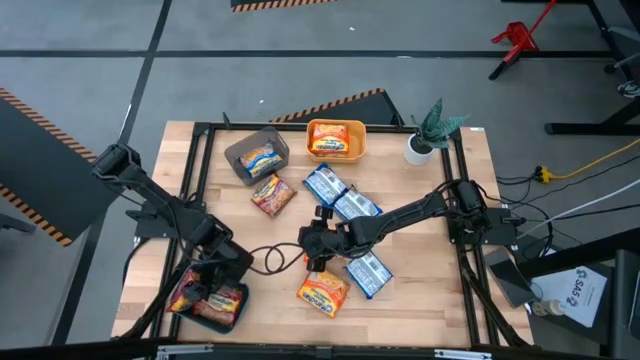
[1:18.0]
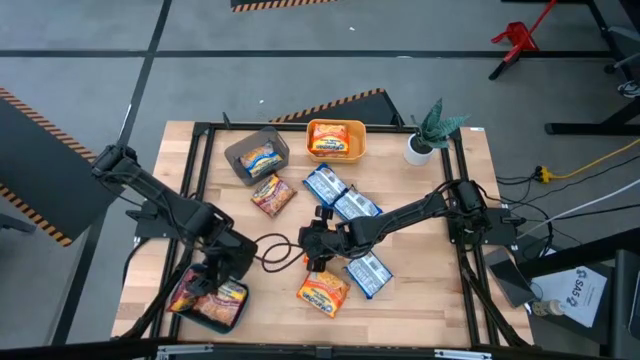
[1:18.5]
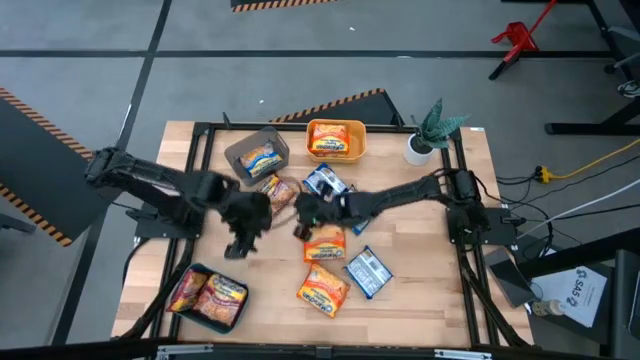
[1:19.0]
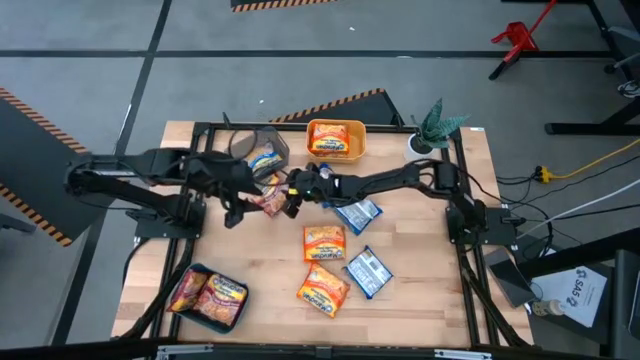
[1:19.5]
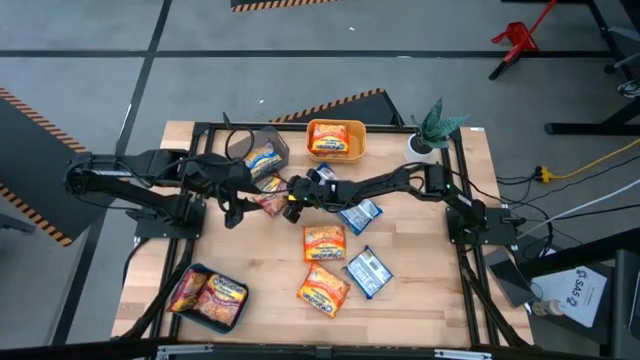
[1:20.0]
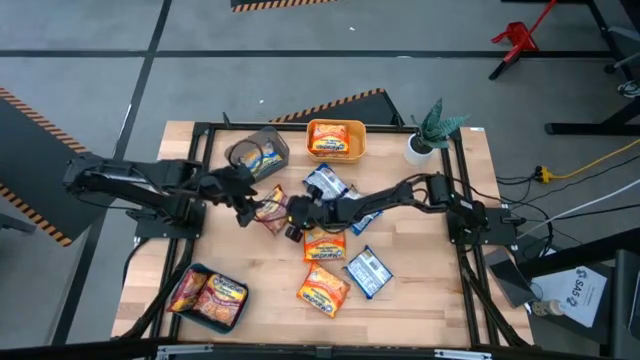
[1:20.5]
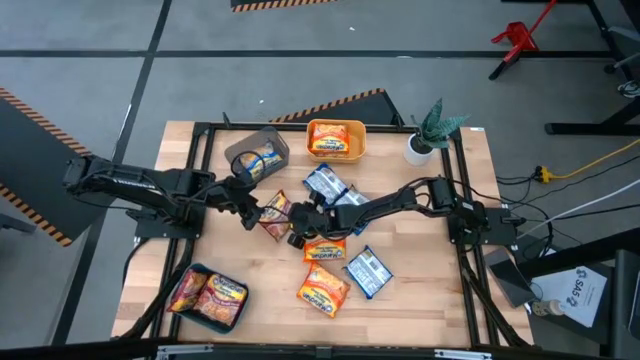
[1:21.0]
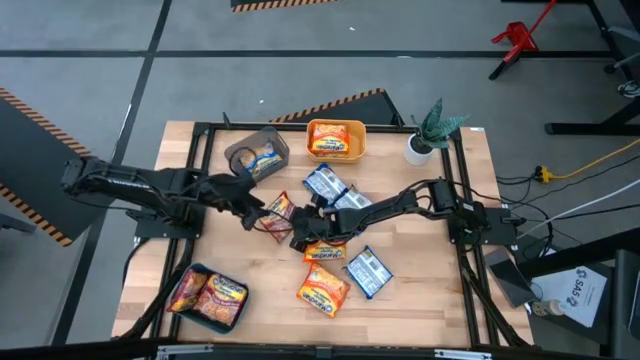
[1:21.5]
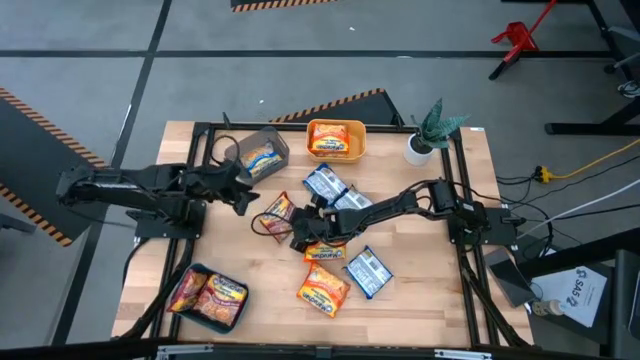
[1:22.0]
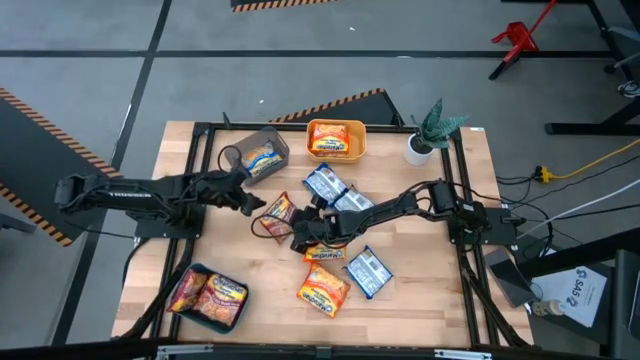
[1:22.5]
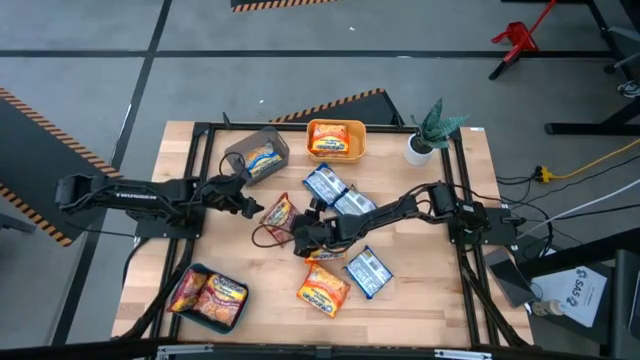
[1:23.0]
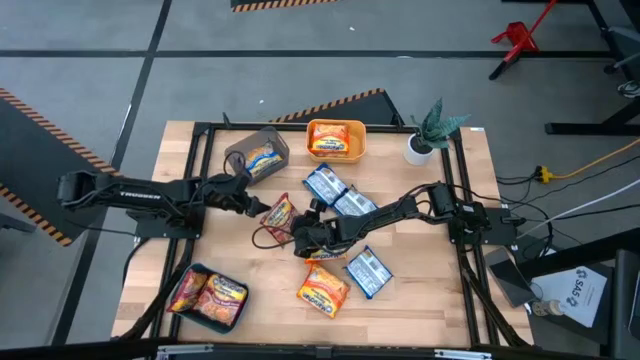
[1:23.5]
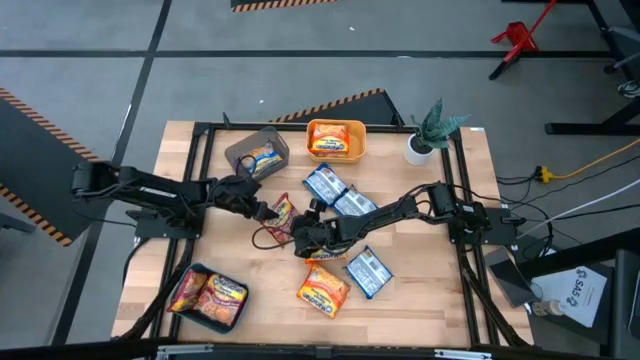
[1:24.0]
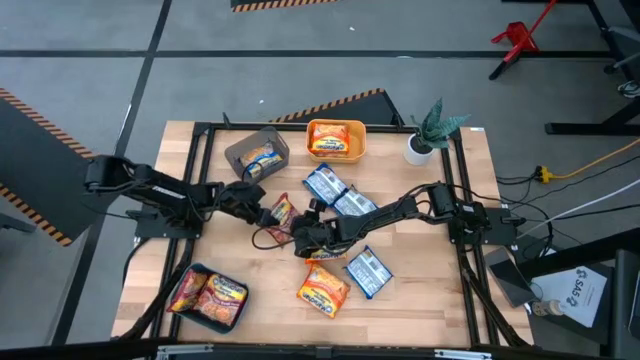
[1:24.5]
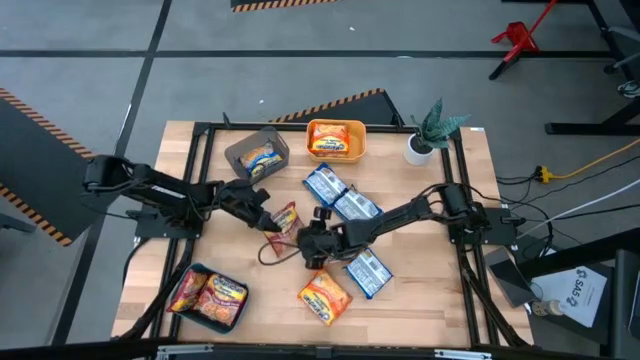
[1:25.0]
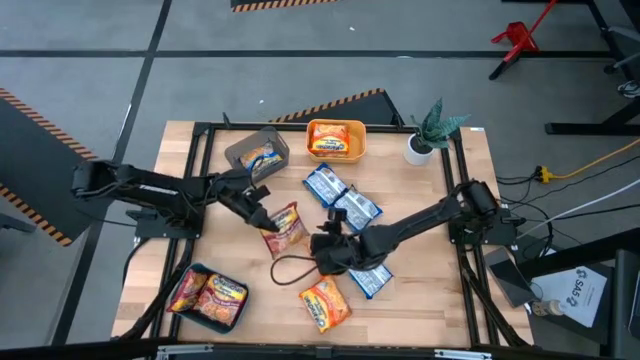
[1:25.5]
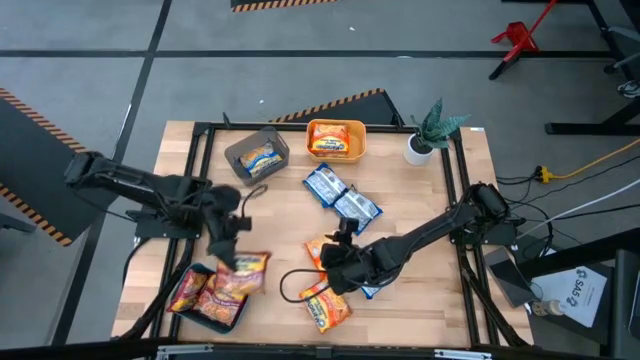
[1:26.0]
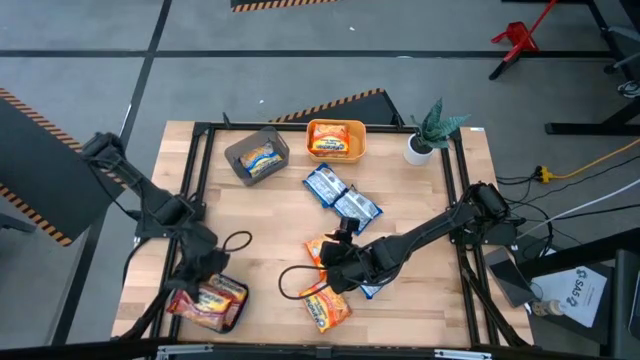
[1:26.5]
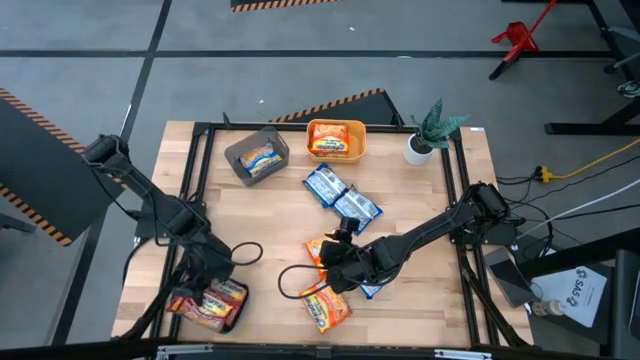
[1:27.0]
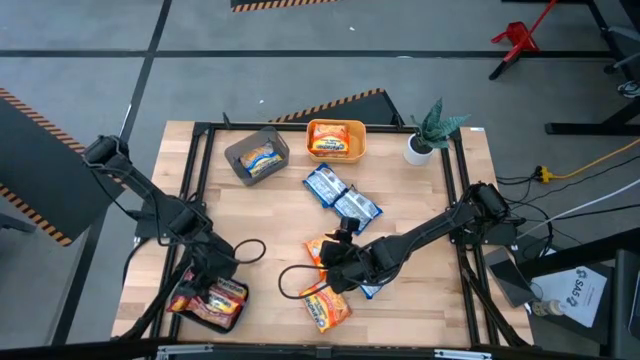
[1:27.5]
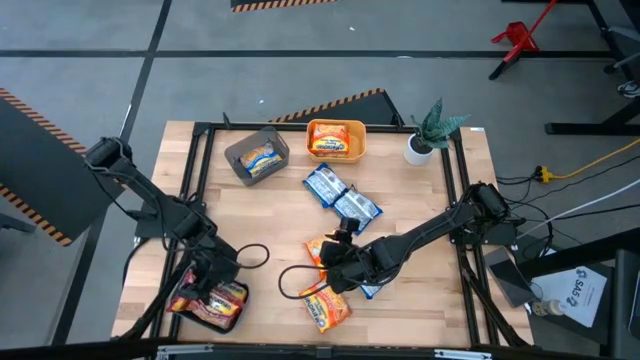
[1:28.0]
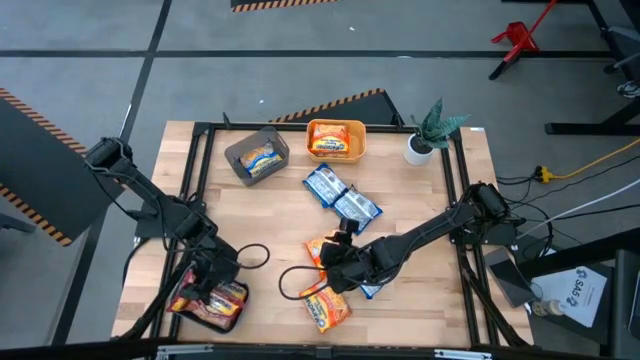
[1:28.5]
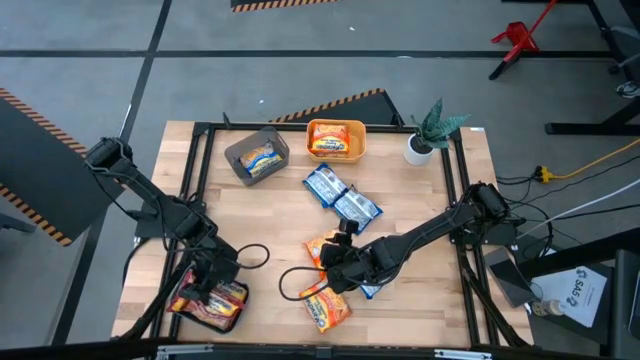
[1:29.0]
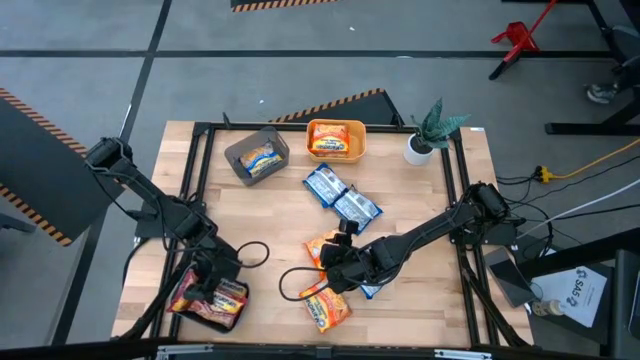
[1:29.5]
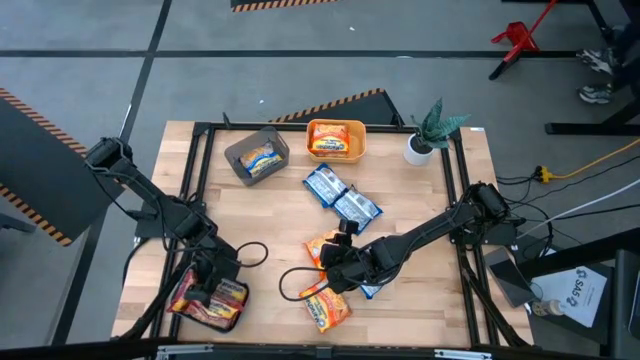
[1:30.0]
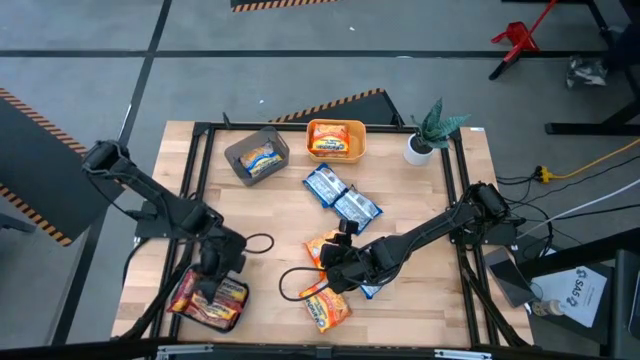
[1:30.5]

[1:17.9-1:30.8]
Task: Sort Maruchan noodles
Put the pack of red ramen noodle soup into the teal blue bin

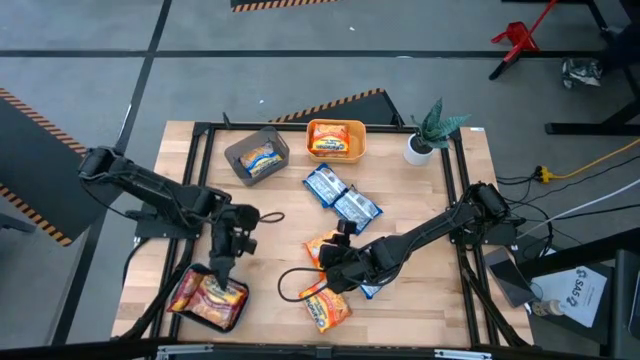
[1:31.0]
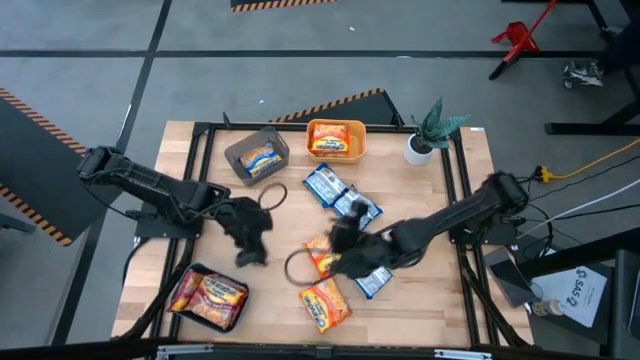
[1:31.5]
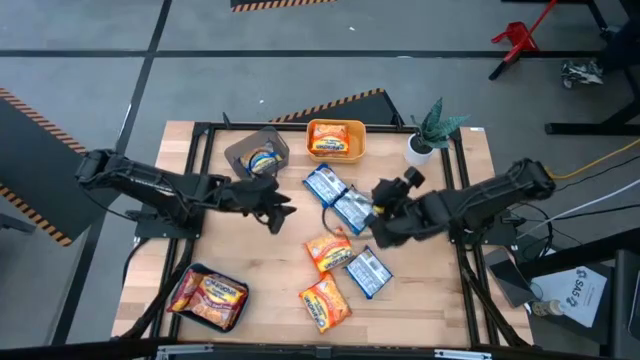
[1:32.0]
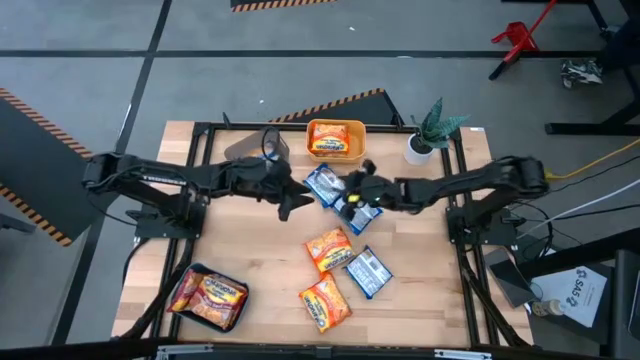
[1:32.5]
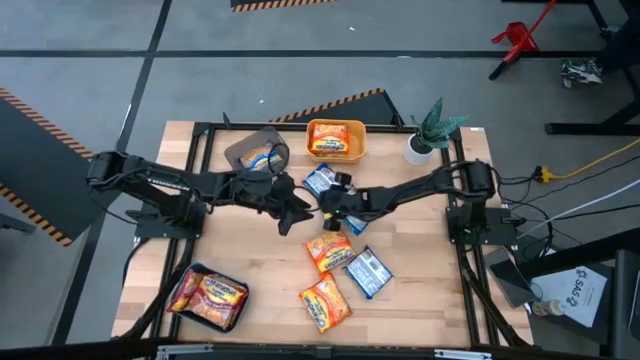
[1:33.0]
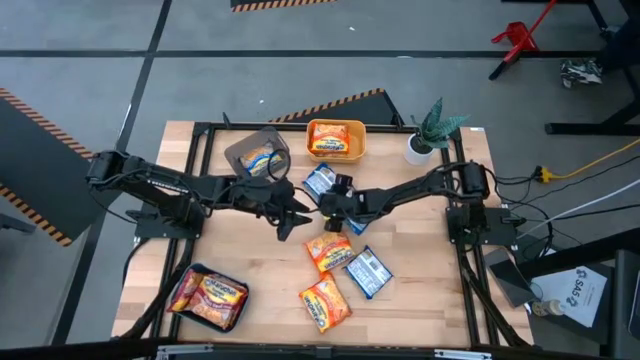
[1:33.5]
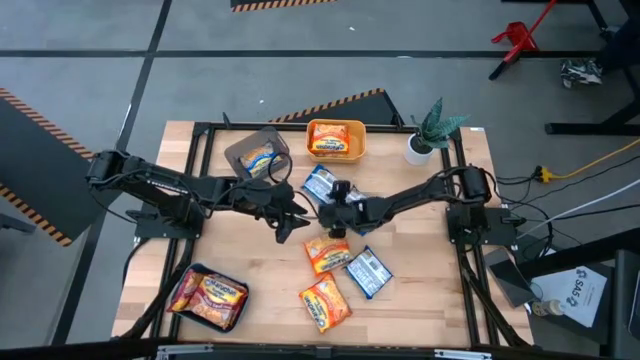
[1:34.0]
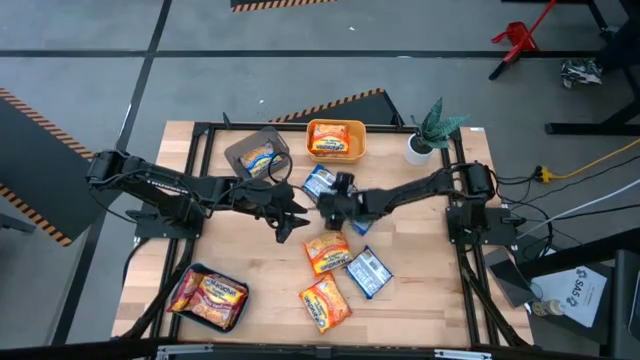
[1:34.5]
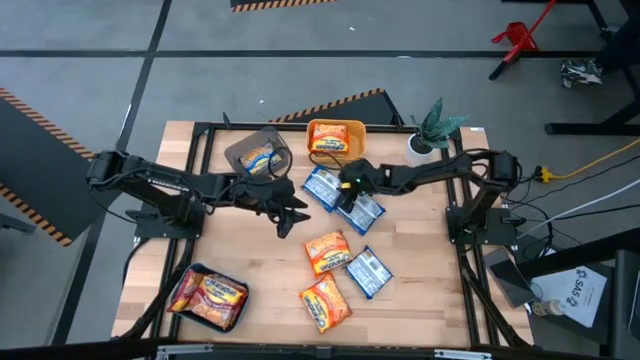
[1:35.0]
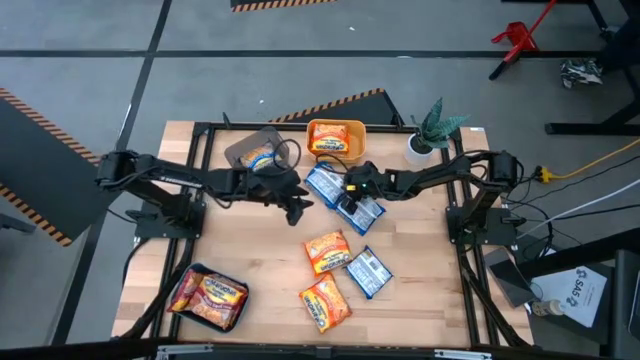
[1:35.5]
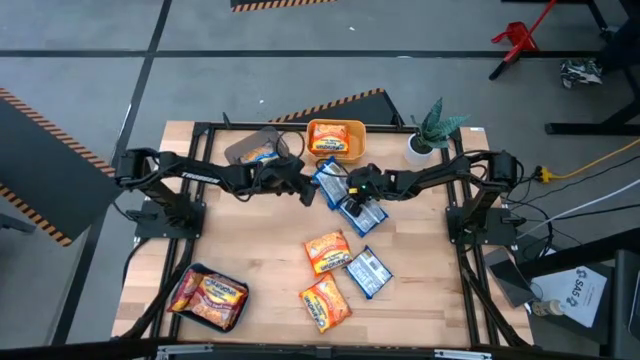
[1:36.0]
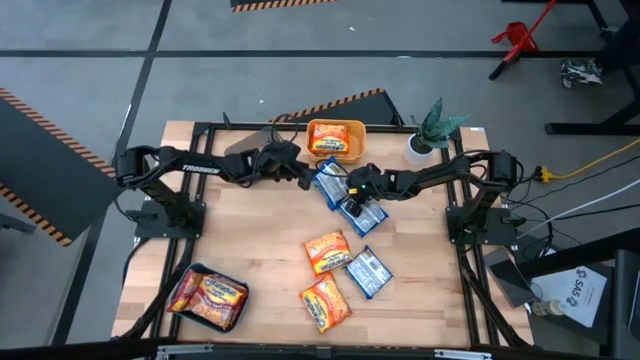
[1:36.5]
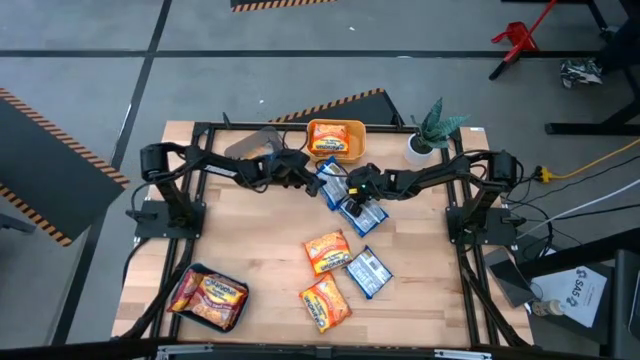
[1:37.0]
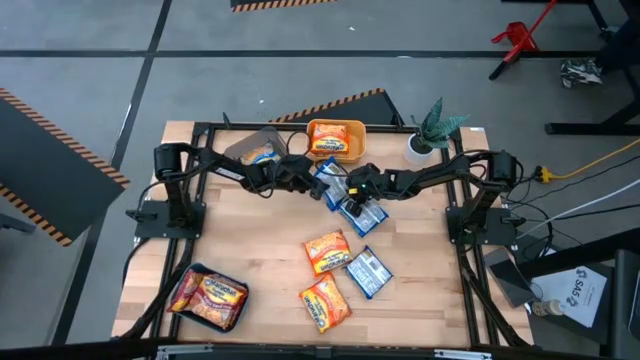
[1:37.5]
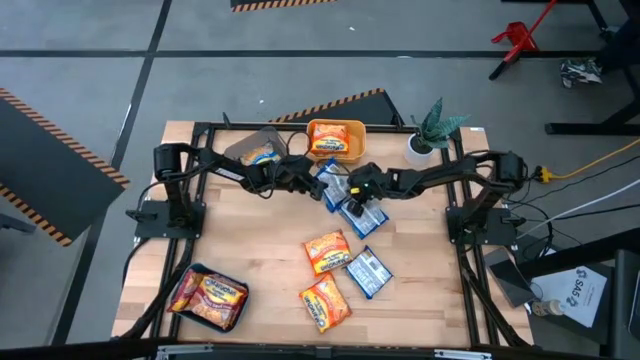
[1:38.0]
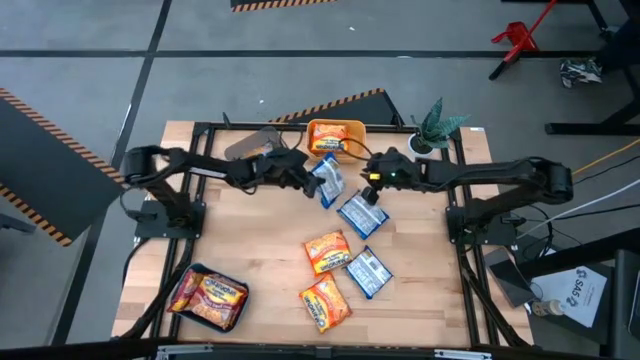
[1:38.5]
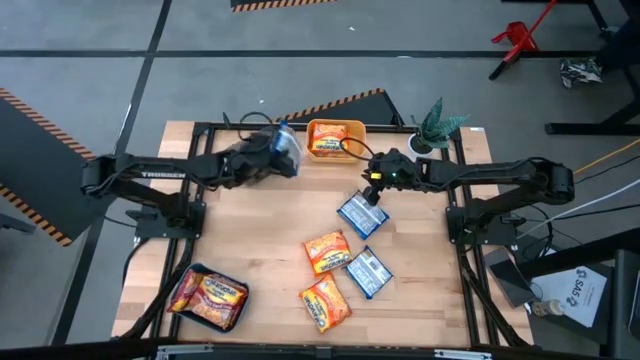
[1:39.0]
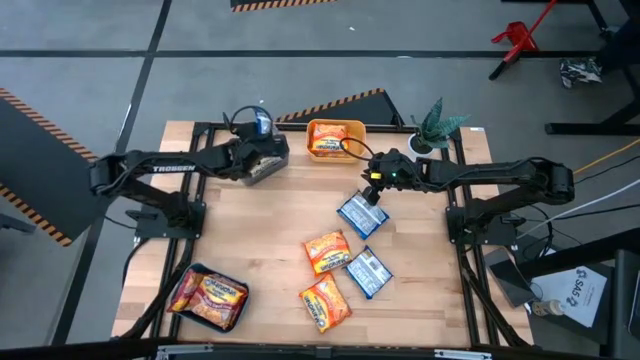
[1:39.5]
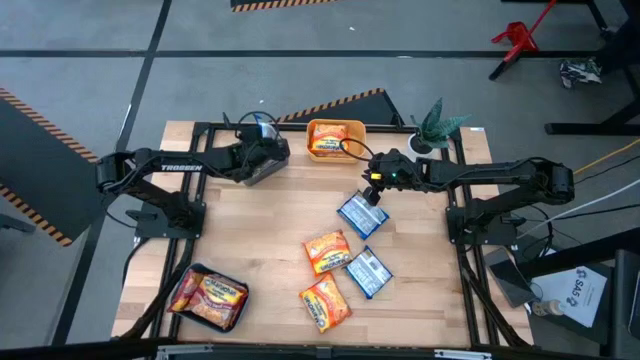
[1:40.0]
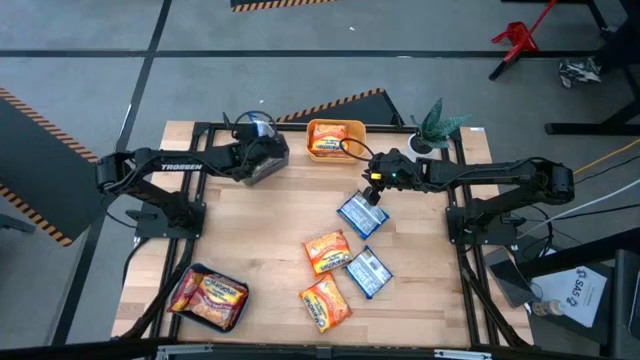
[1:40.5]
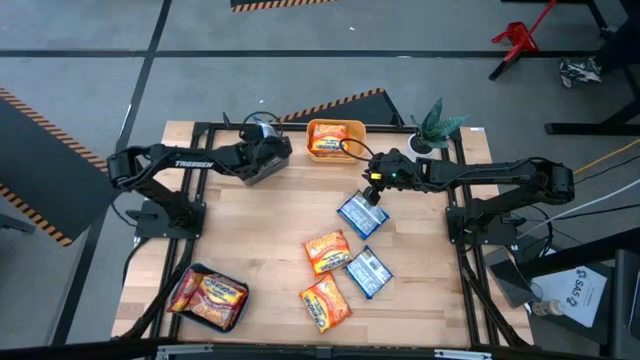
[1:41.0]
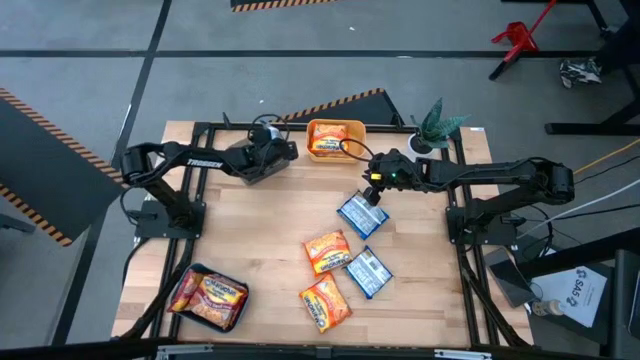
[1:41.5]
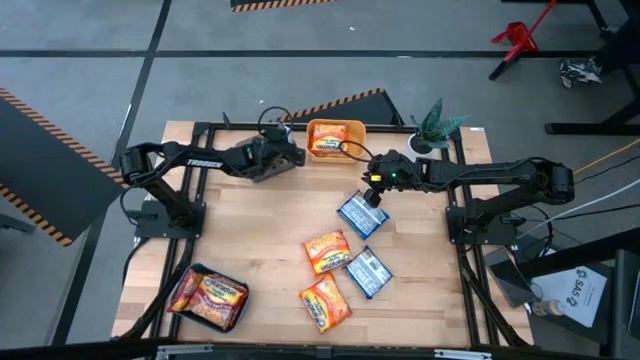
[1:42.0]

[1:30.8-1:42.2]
Put the pack of blue ramen noodle soup into the transparent black bin
